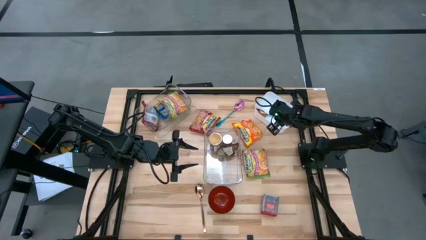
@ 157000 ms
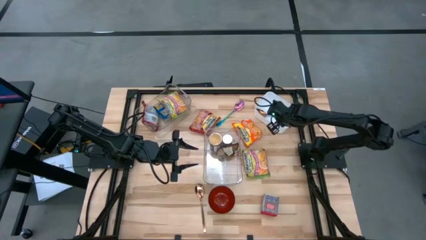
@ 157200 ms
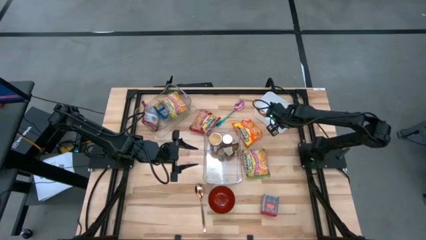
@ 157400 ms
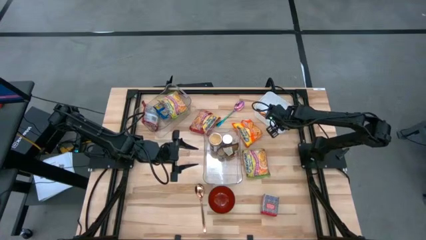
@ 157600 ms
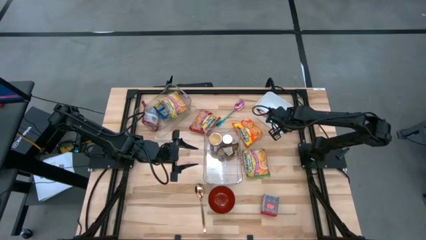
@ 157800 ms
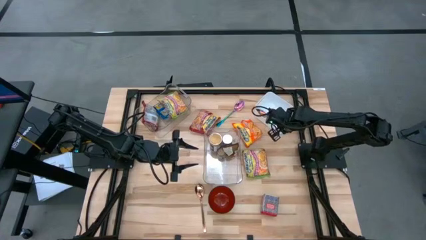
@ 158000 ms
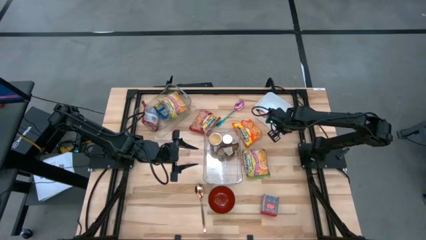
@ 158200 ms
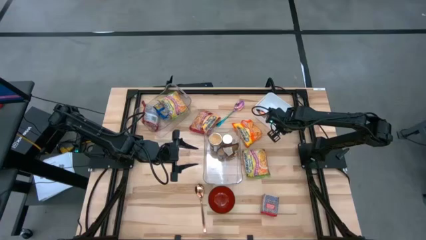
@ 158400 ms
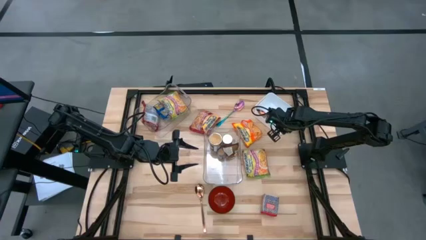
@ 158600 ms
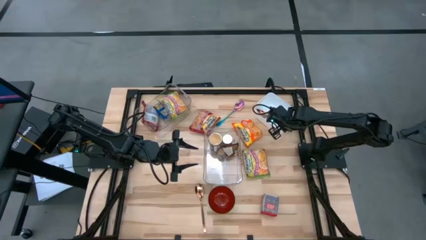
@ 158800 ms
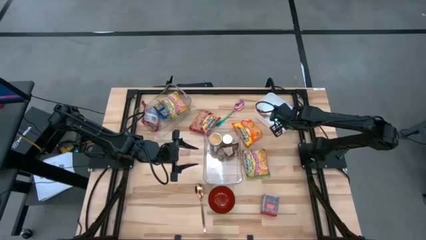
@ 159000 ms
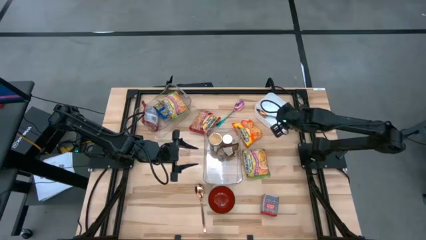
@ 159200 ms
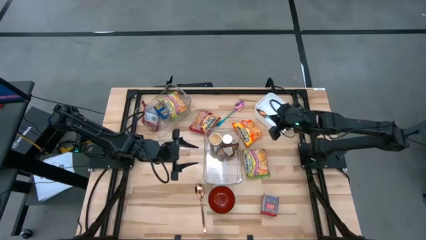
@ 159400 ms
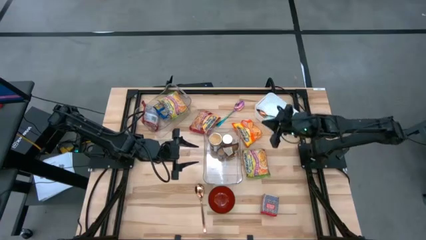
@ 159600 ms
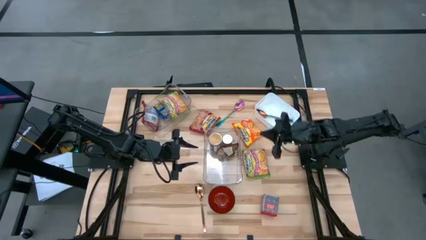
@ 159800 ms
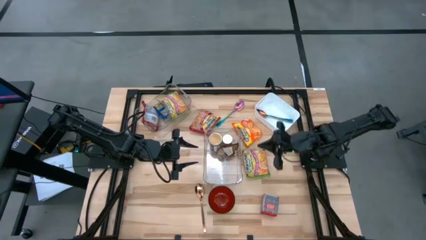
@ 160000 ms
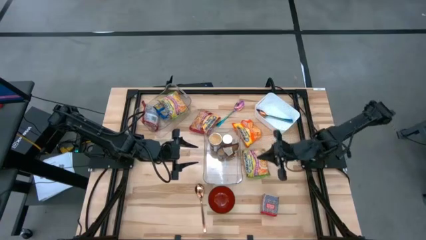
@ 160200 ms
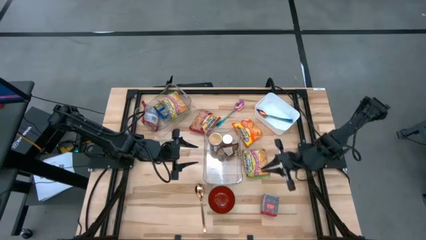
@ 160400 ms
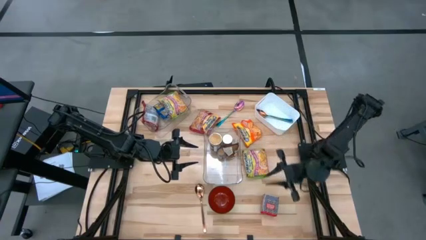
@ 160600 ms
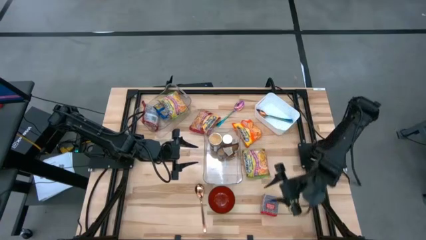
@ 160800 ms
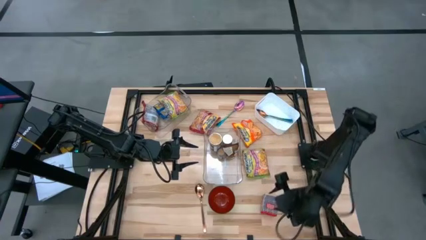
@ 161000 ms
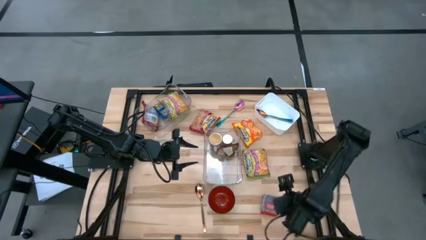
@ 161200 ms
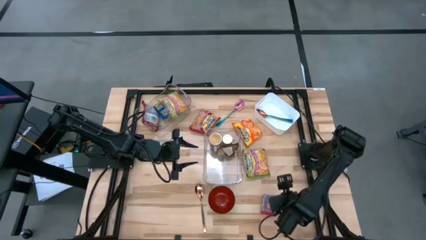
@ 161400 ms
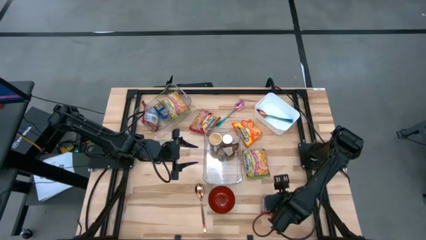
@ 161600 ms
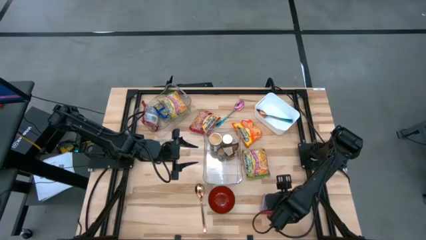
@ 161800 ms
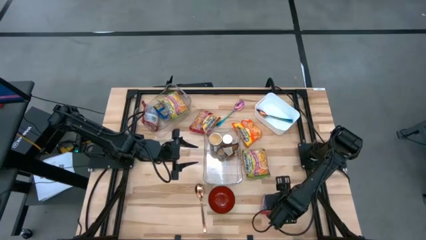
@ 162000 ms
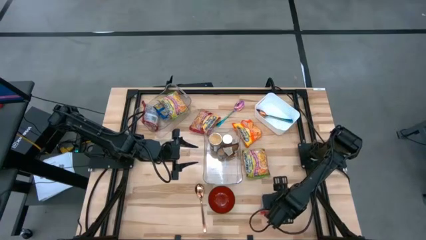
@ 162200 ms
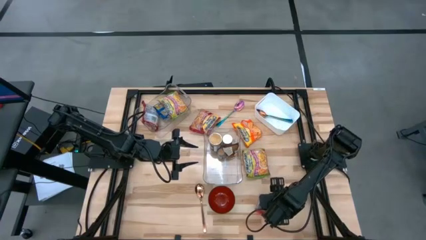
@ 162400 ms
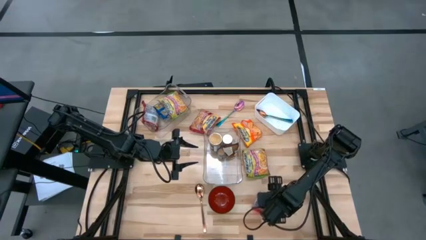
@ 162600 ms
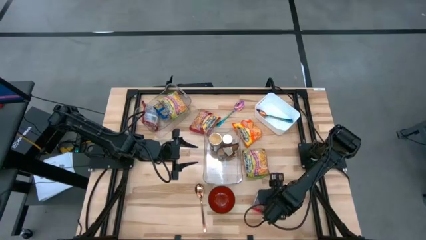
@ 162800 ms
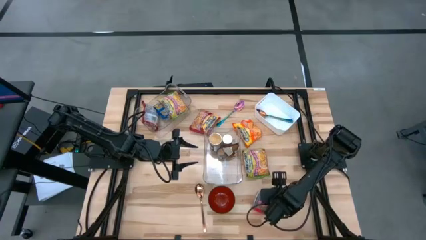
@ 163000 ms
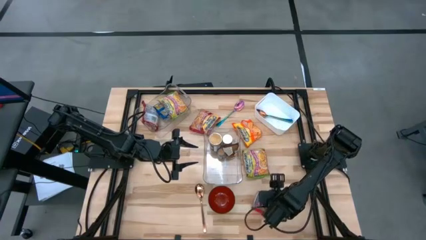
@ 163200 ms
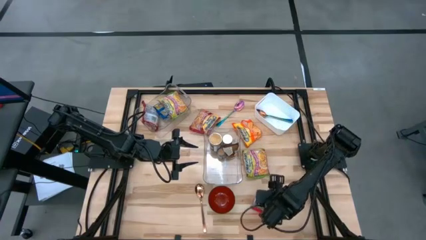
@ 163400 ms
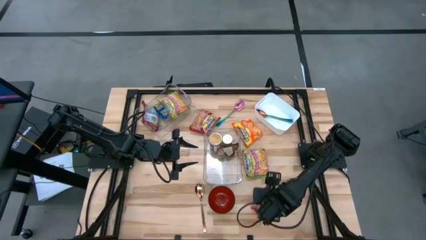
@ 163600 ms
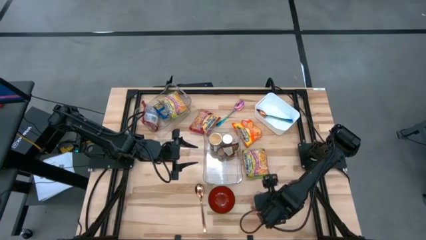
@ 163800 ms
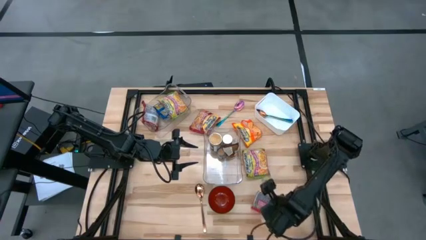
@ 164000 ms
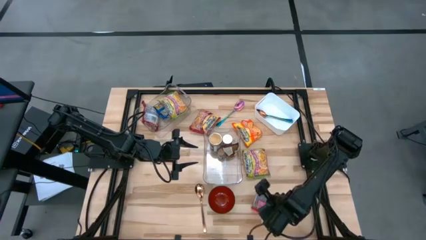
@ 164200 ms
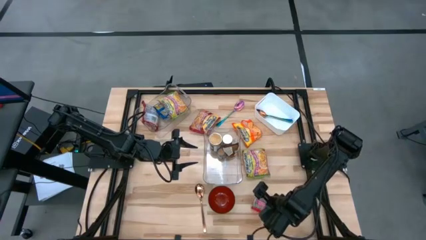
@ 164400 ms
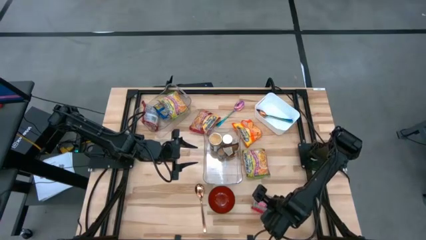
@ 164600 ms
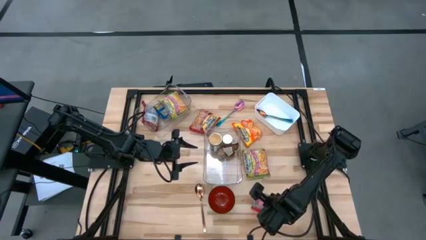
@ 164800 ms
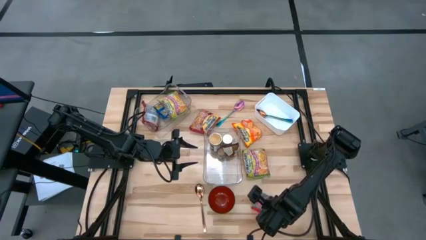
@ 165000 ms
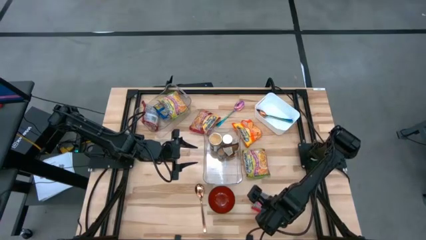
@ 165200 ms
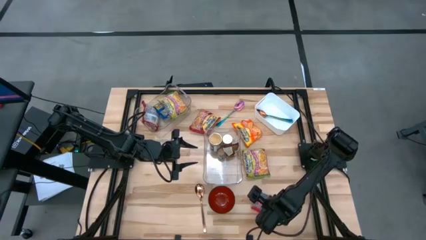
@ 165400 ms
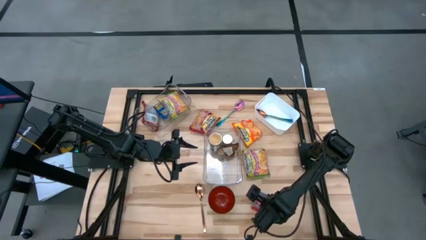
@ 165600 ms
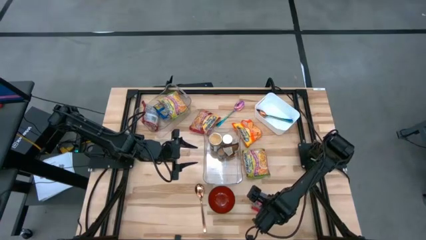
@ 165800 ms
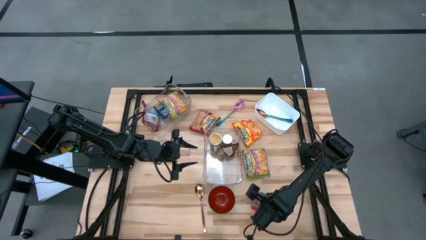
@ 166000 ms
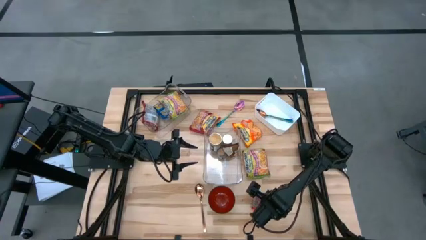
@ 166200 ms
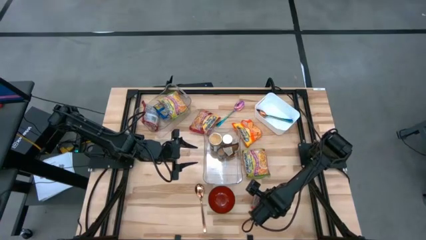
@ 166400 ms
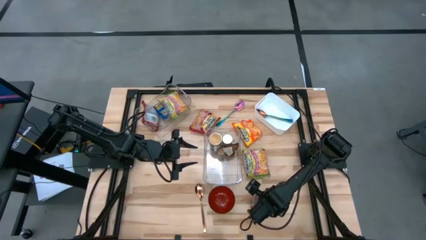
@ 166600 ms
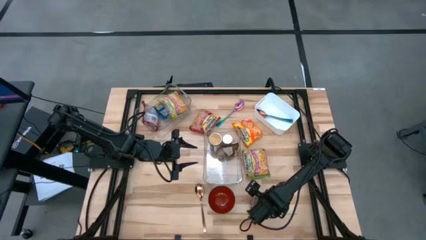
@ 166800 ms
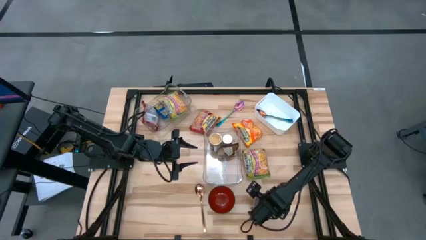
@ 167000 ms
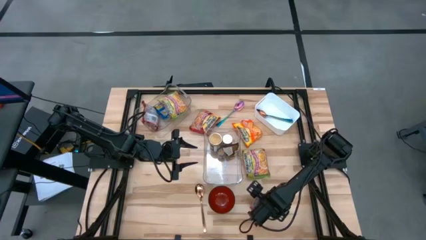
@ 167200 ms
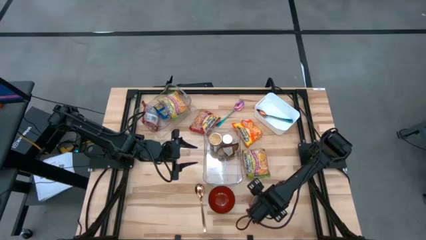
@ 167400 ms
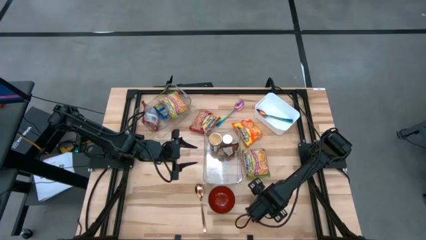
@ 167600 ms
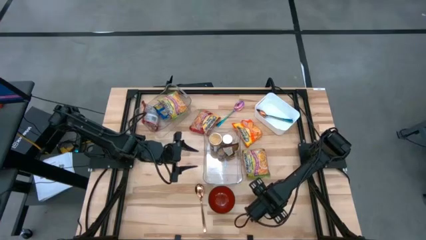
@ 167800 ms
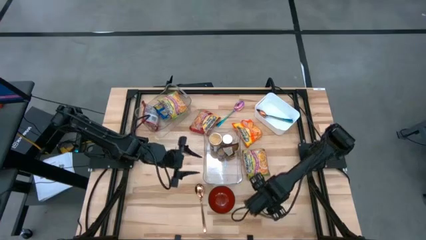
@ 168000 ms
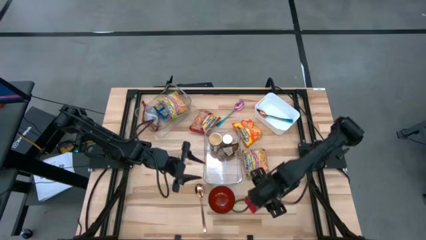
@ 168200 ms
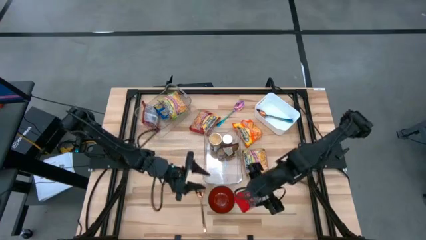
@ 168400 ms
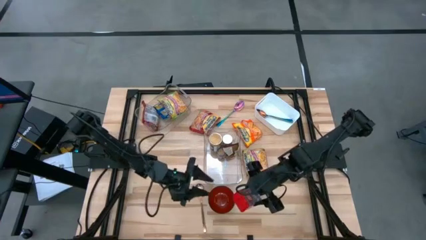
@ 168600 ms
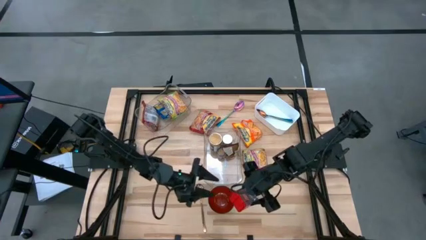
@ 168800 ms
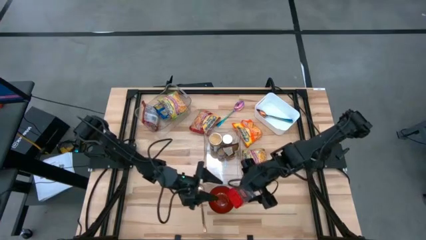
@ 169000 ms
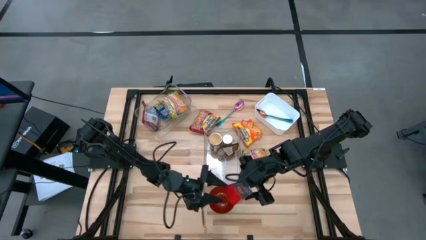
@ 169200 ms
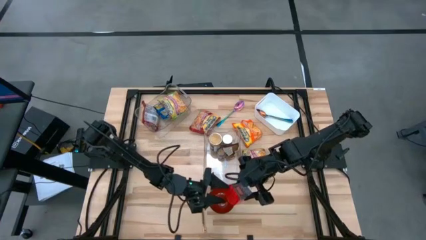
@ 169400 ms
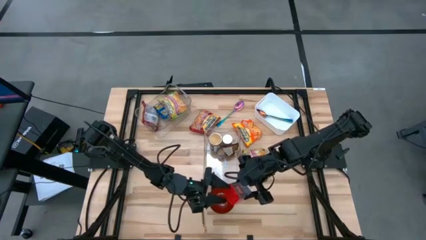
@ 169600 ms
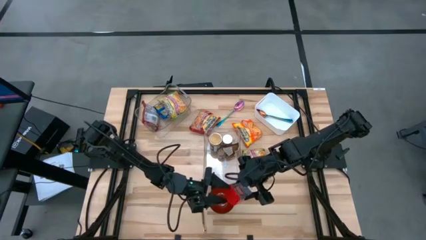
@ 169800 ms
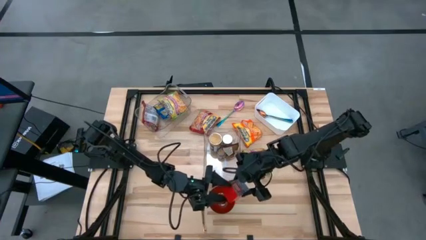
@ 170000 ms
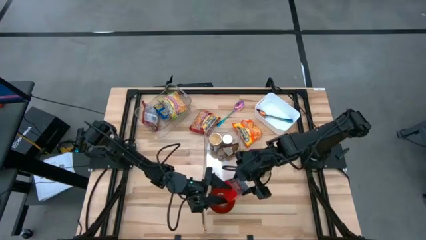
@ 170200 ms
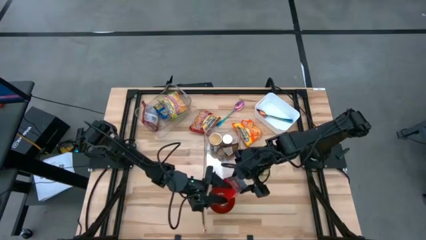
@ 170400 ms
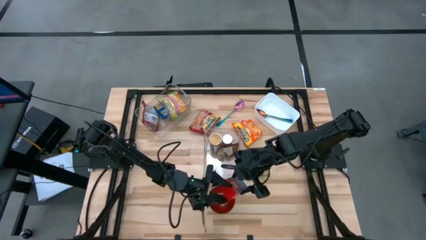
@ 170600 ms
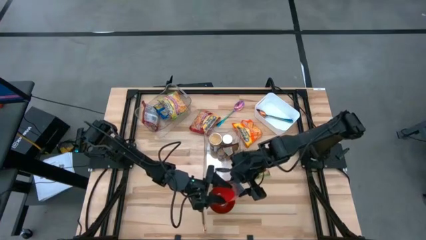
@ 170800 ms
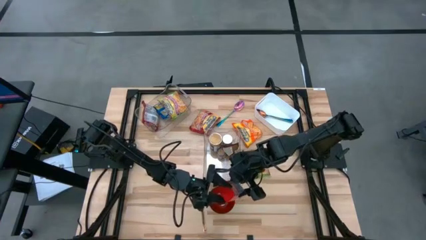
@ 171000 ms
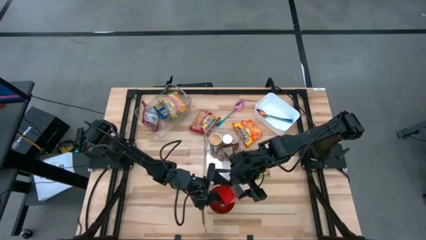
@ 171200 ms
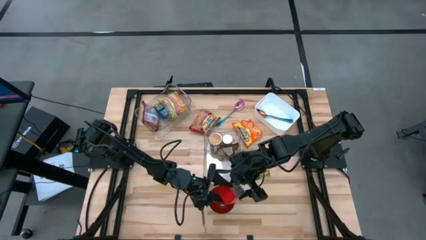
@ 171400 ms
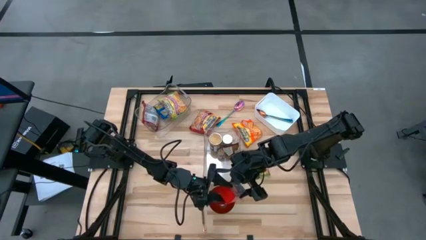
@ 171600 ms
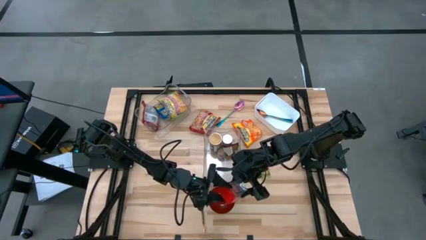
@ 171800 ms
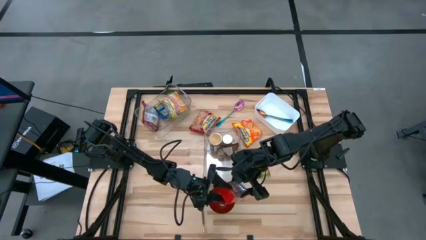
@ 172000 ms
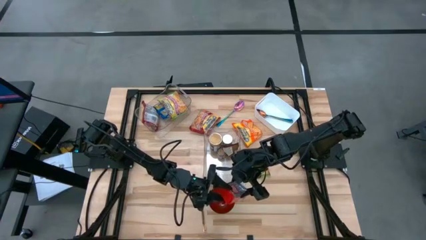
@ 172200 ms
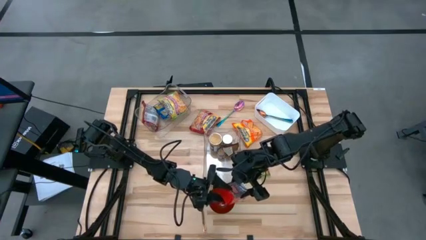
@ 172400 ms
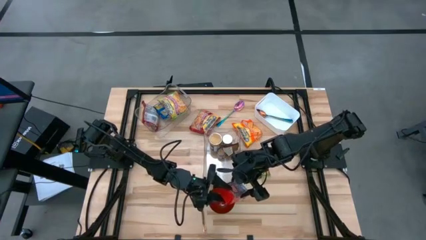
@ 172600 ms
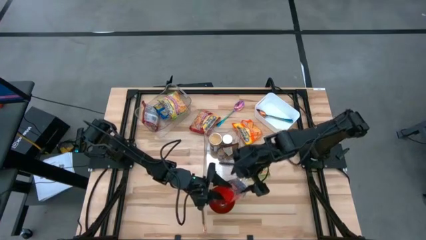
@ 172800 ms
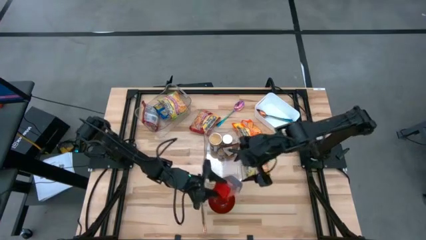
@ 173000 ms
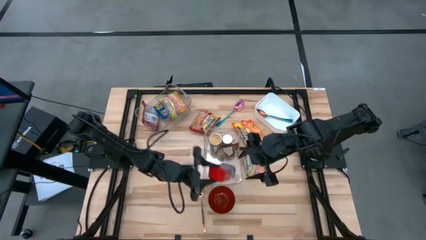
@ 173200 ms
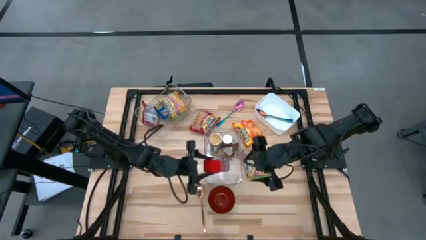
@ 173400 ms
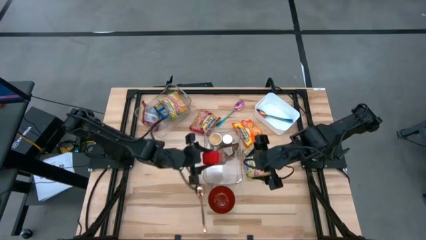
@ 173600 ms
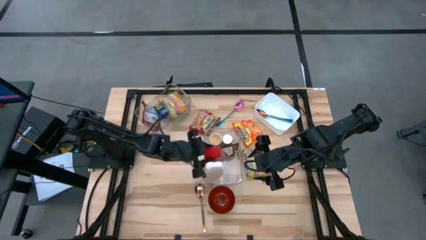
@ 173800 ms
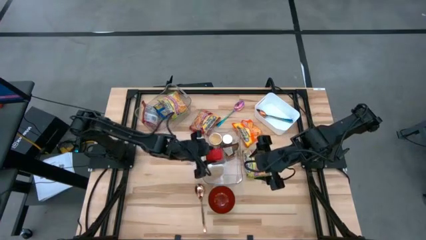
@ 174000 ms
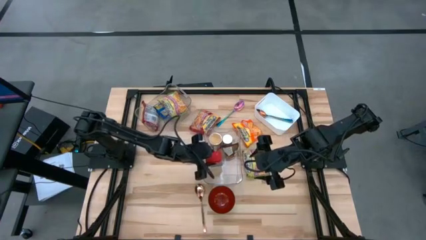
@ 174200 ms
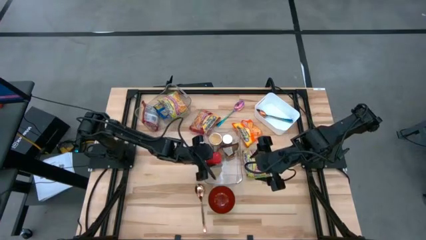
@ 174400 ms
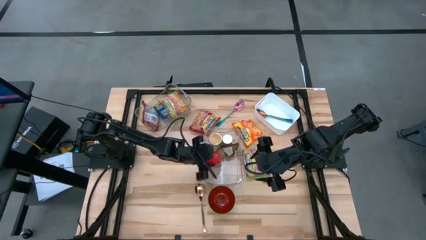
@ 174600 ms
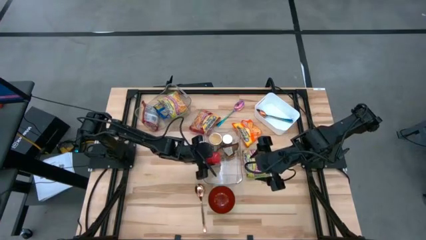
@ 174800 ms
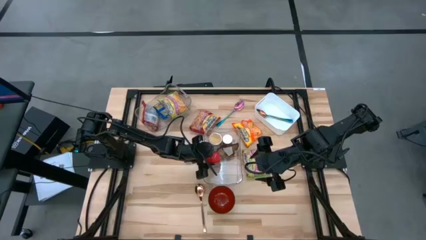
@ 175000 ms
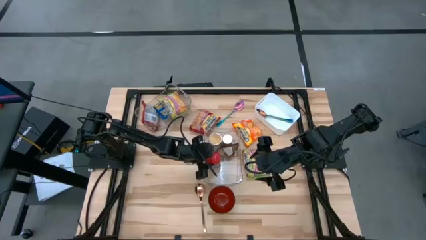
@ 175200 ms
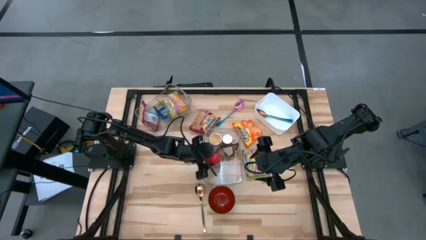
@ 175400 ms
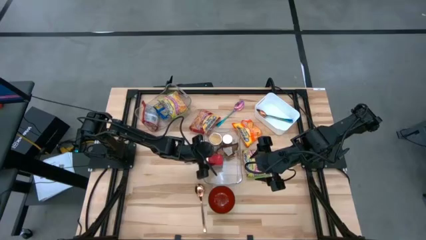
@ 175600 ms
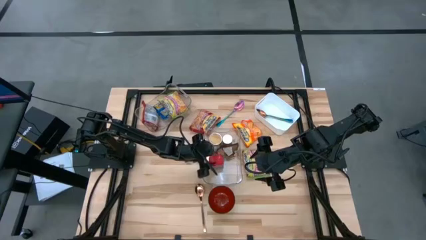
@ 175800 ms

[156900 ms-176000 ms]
Task: Pick & Place Food Item
Put the red spice can into the bottom transparent bin
